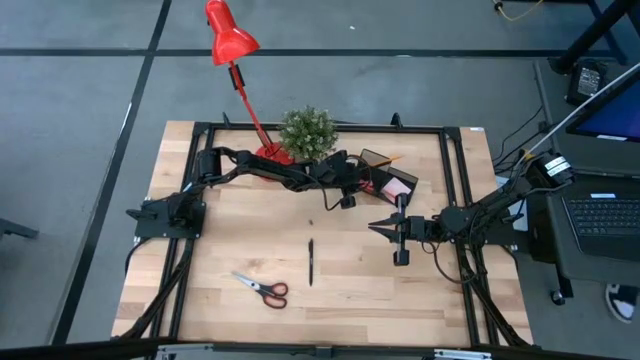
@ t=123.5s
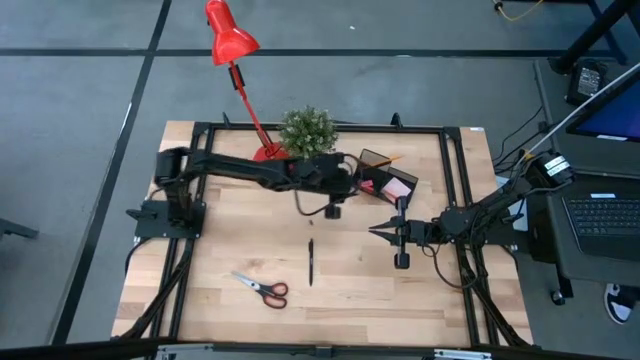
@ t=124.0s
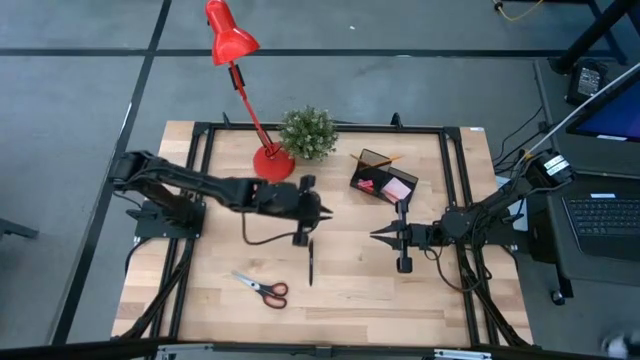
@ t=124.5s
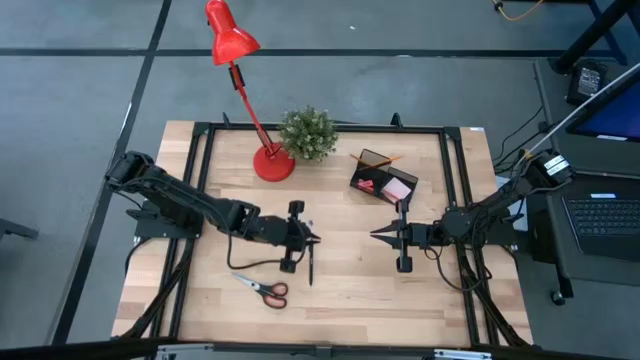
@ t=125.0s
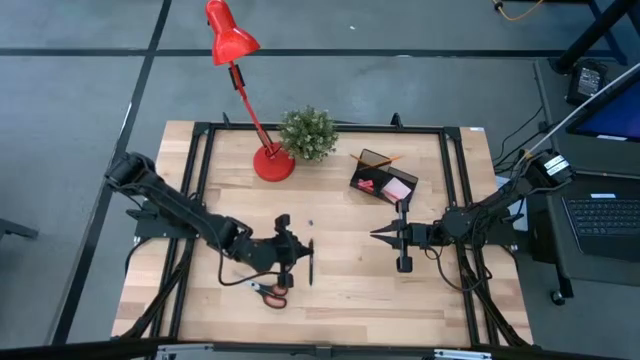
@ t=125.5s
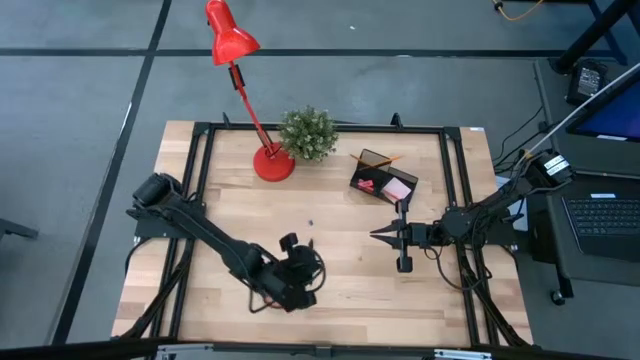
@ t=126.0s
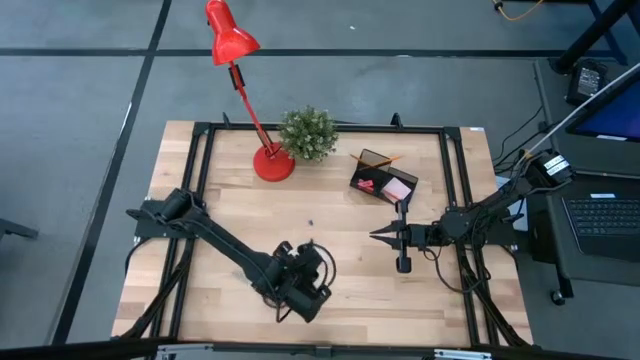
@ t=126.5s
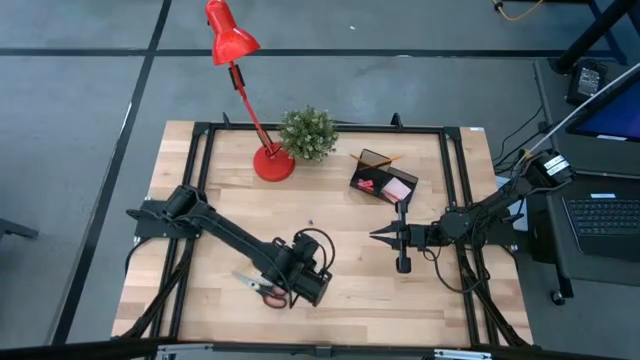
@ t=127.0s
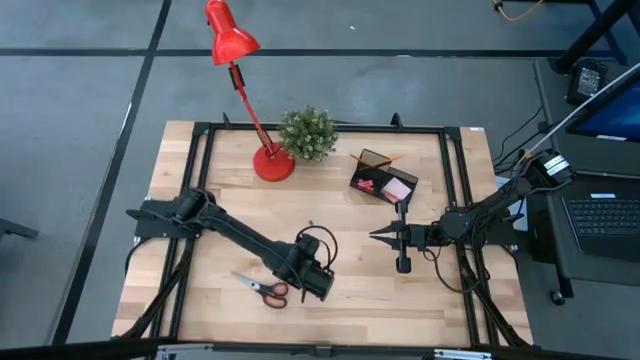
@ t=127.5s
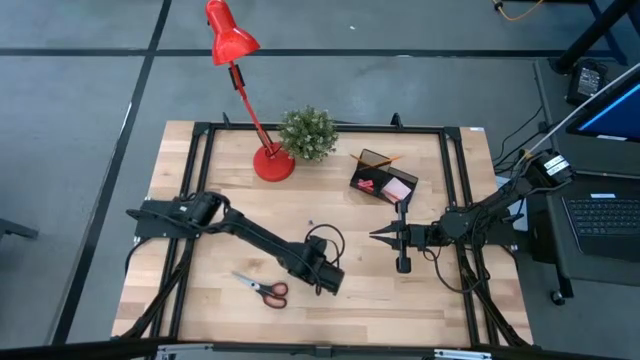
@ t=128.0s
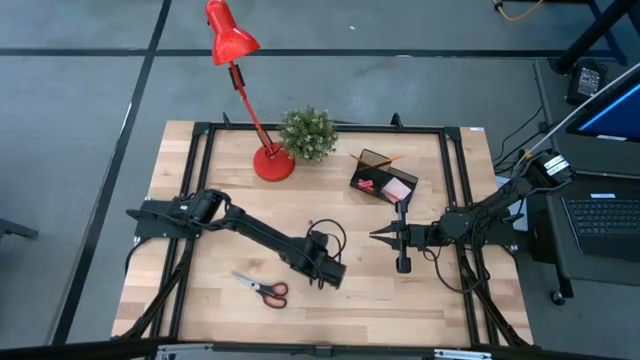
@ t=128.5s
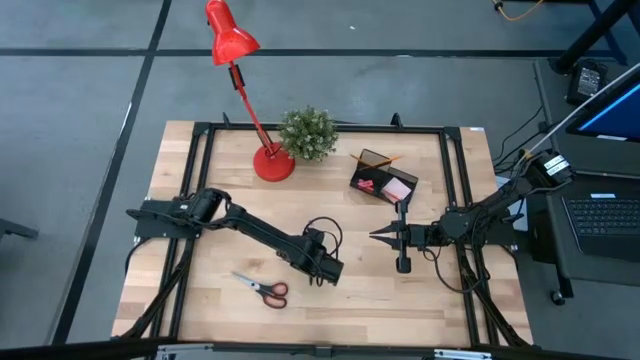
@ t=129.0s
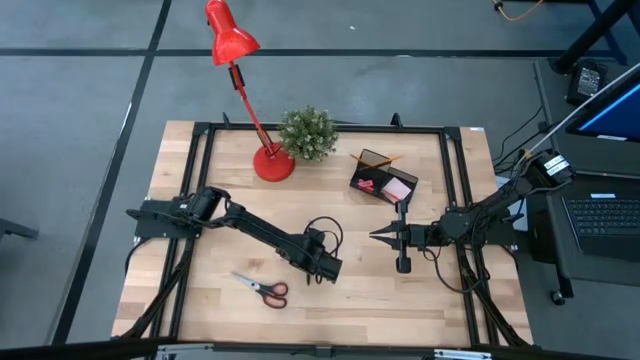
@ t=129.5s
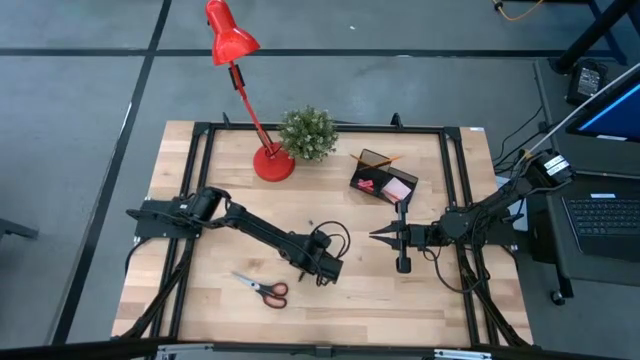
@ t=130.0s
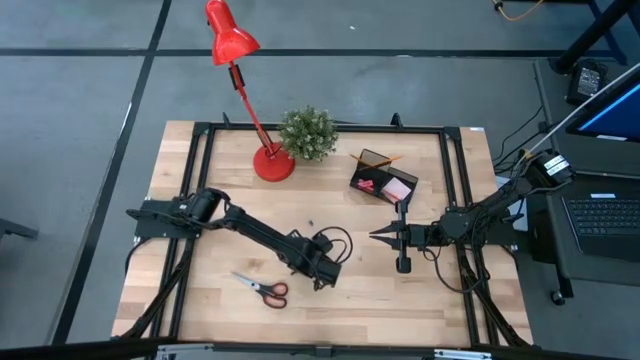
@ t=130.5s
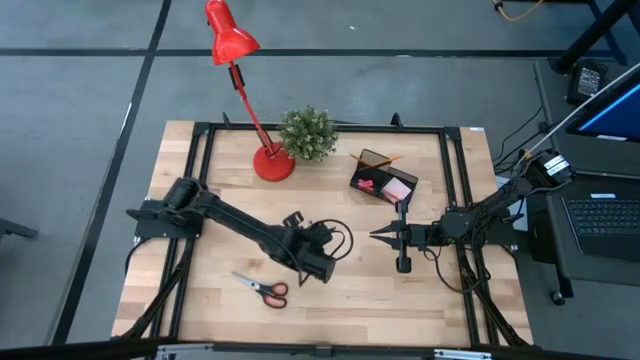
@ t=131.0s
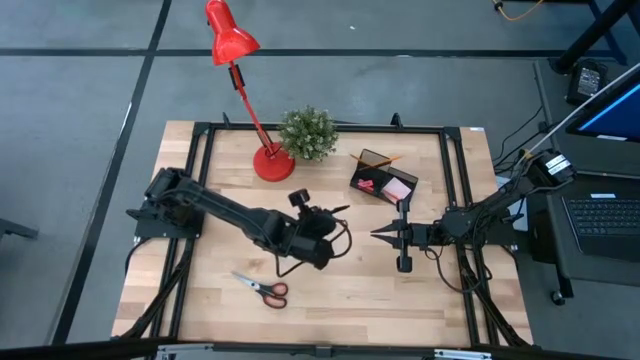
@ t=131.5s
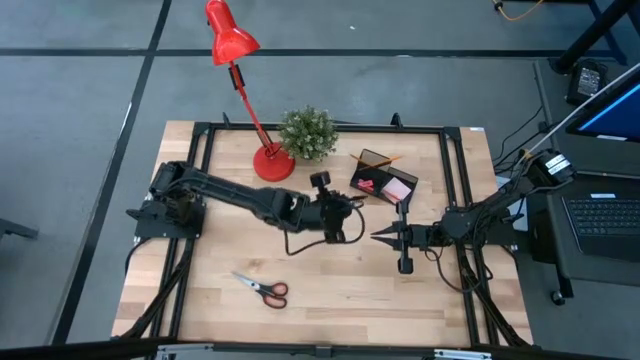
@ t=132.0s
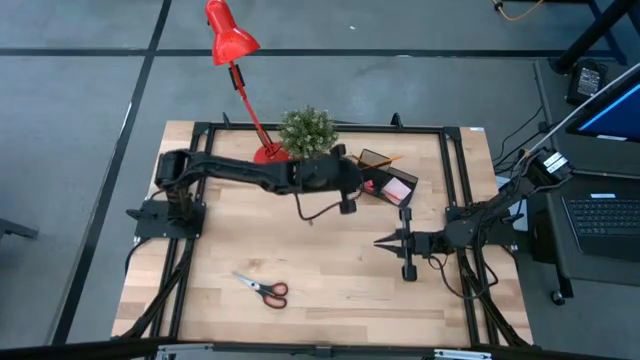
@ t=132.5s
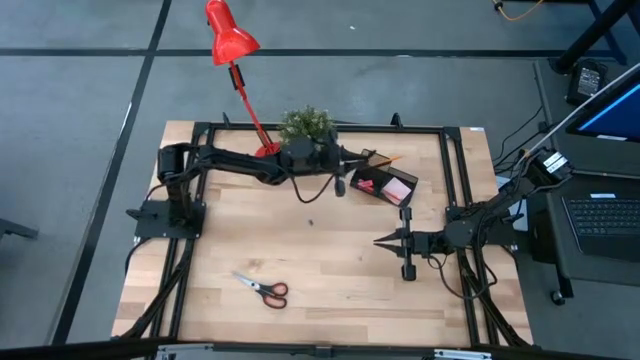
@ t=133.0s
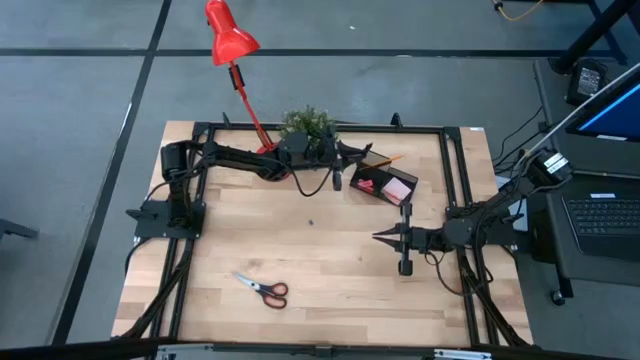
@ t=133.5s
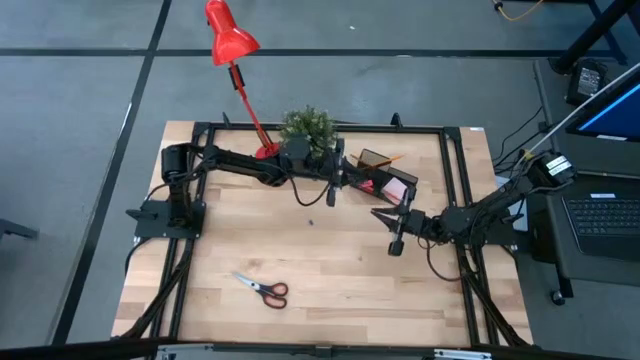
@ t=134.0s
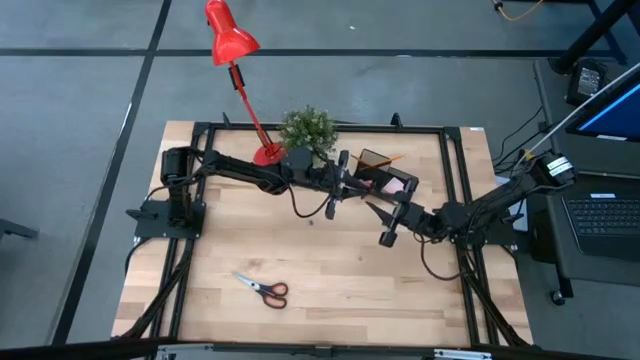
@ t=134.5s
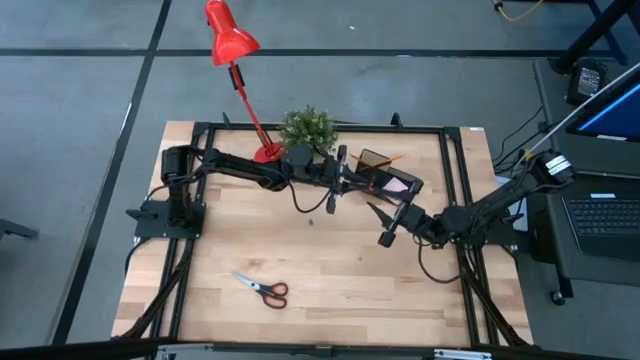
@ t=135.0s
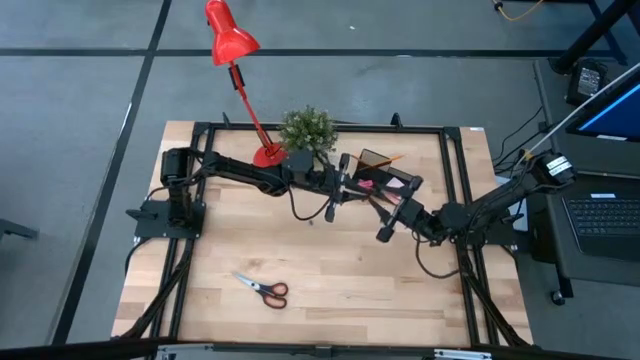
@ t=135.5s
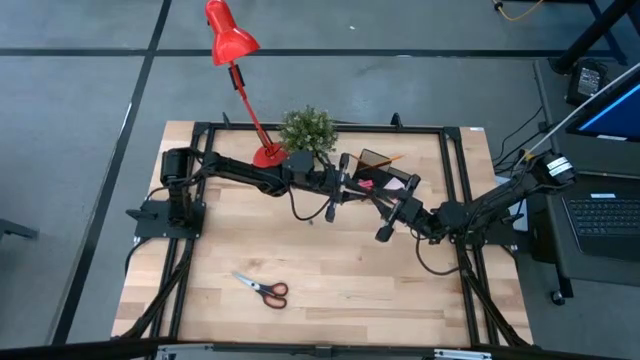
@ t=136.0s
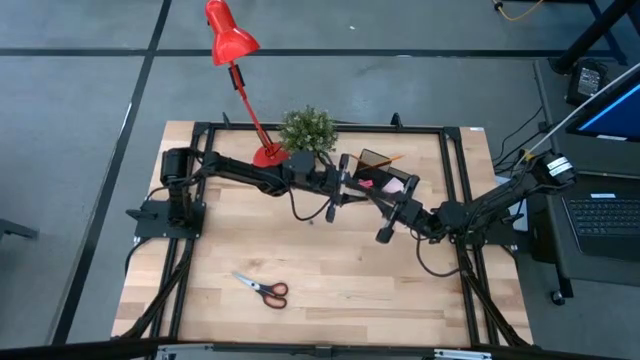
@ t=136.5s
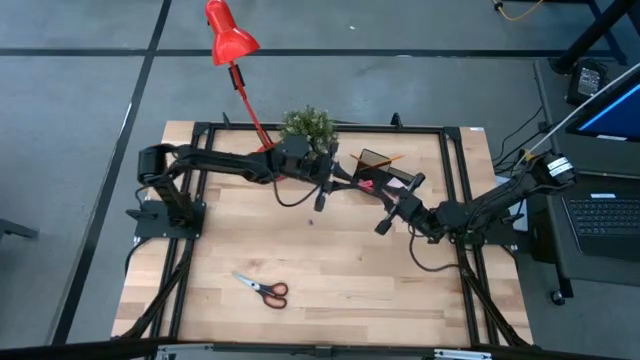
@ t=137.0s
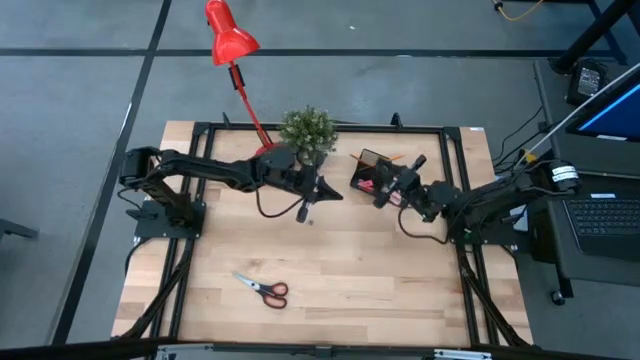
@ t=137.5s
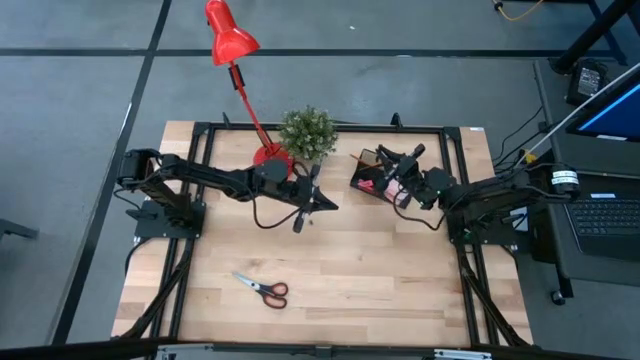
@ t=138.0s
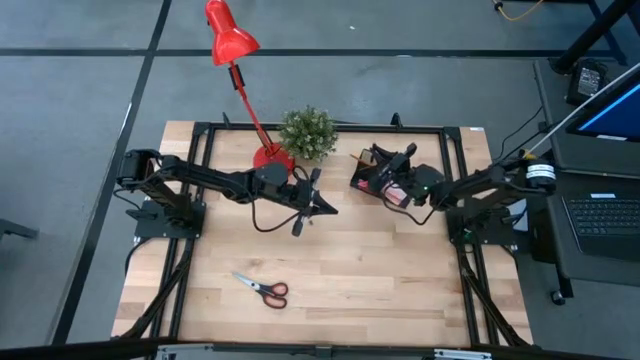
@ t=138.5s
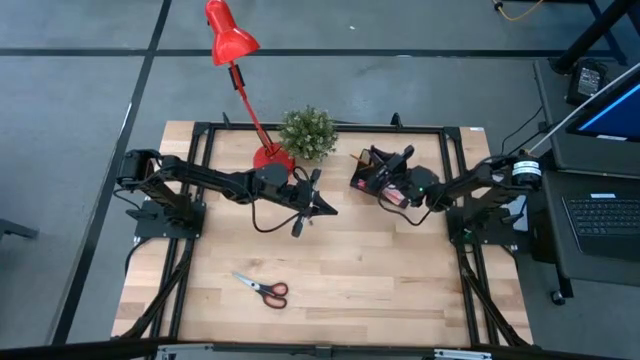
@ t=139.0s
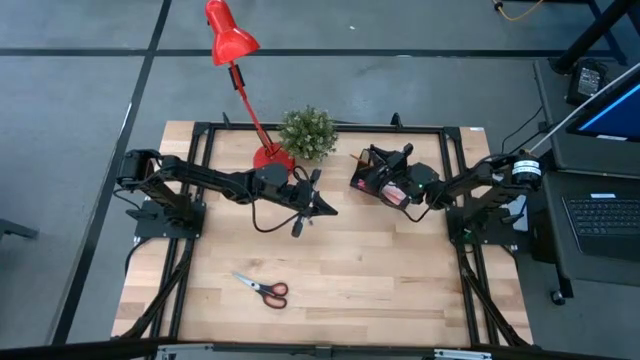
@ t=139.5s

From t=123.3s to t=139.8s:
Task: Pick and place office supplies into organizer
Put the black pen into the black desk organizer

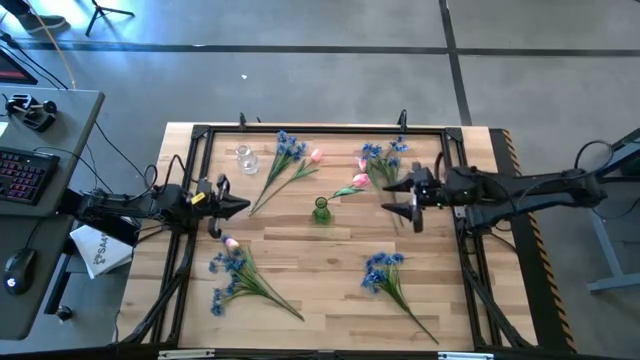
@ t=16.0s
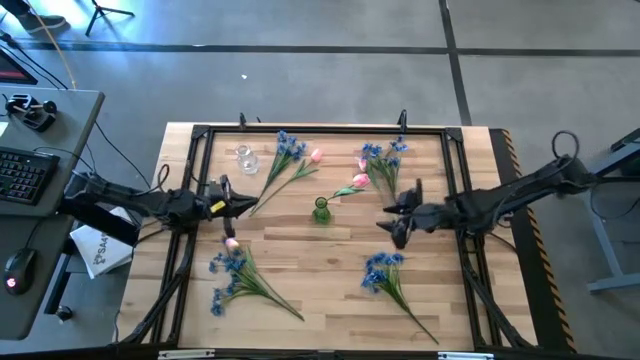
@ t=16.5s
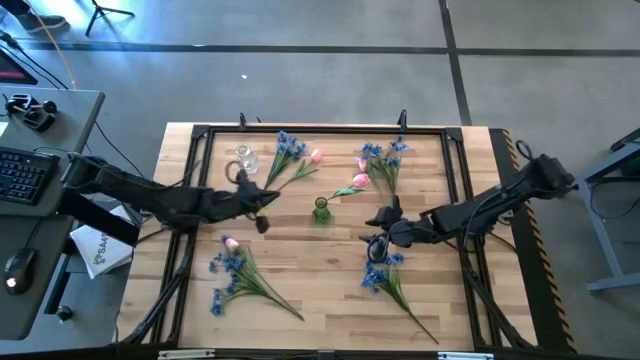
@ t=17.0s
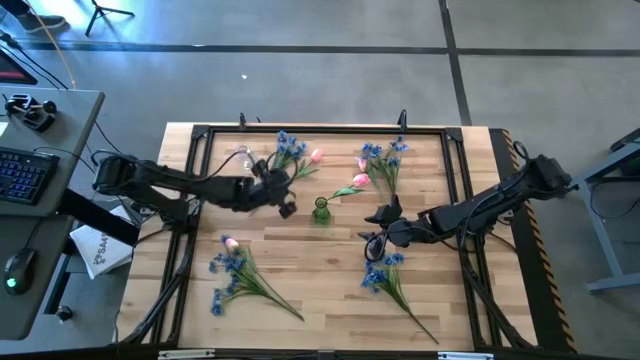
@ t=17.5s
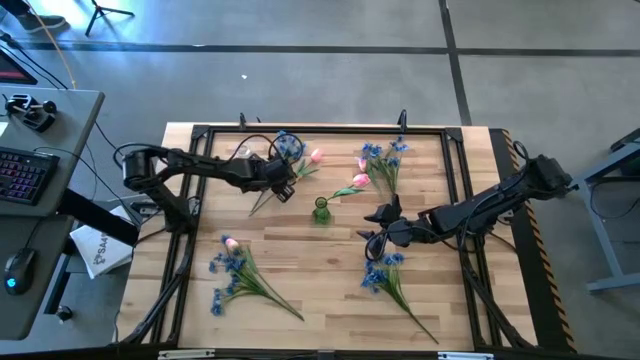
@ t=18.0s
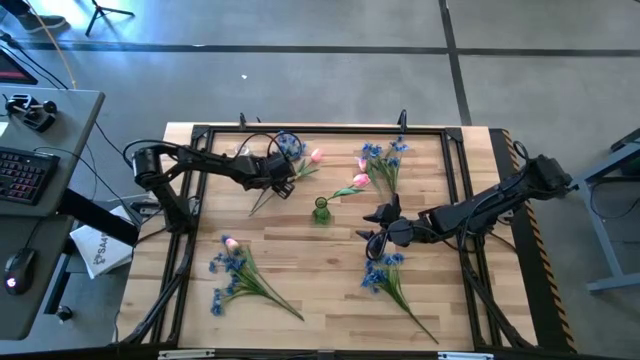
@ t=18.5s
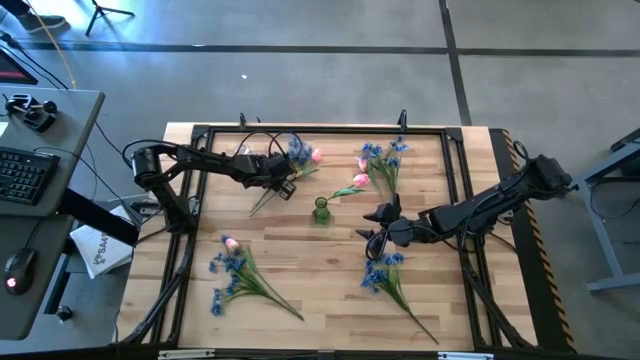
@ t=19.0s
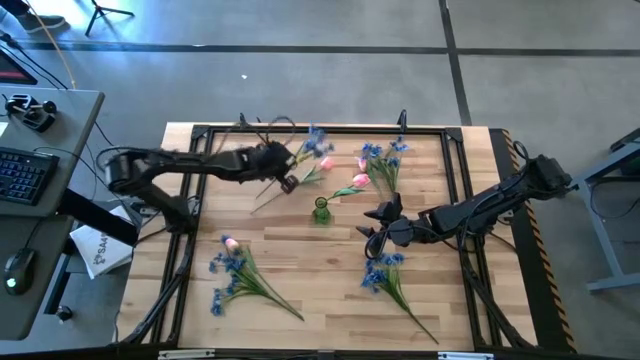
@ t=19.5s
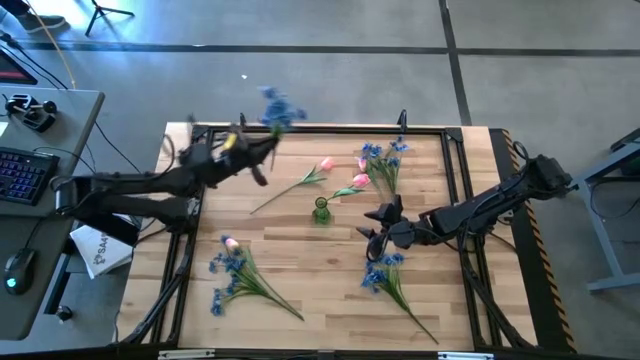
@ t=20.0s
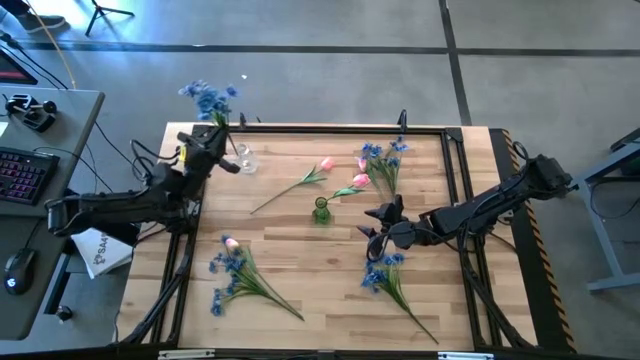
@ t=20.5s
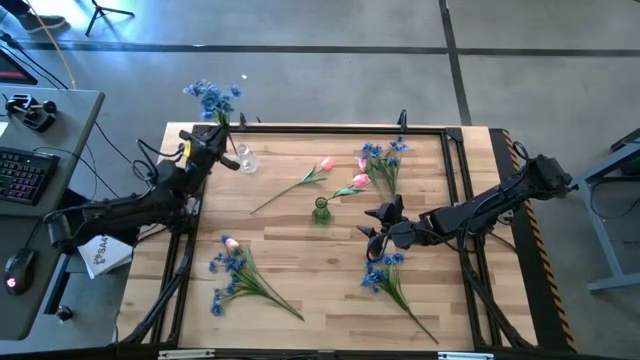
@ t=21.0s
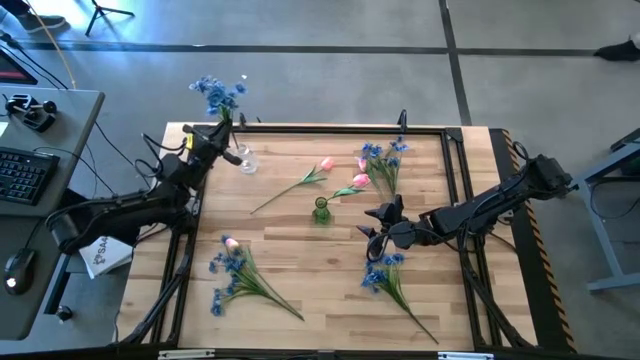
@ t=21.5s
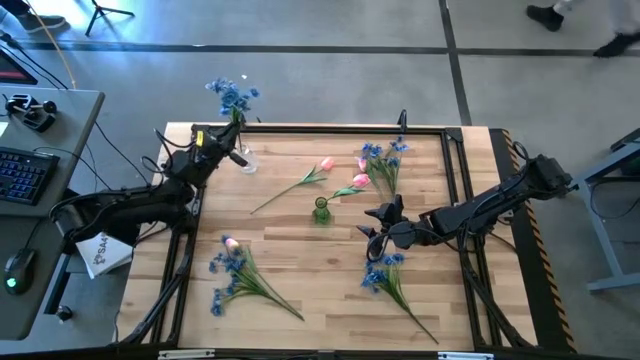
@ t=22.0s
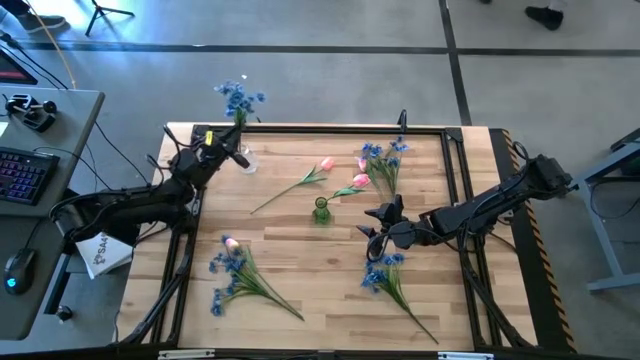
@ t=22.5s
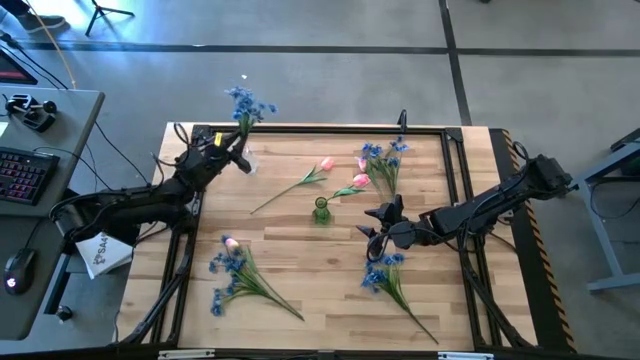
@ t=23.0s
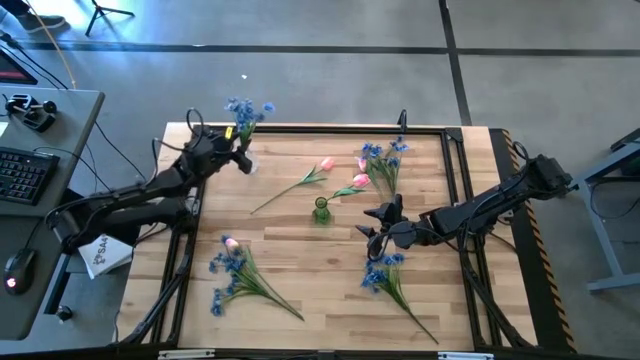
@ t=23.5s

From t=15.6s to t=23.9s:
Task: Sort flowers into vase by color
Put the blue flowers into the transparent vase
